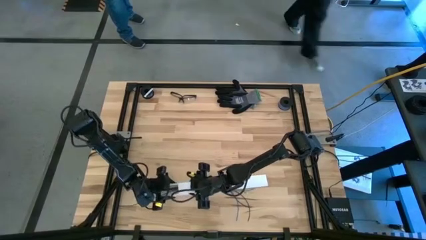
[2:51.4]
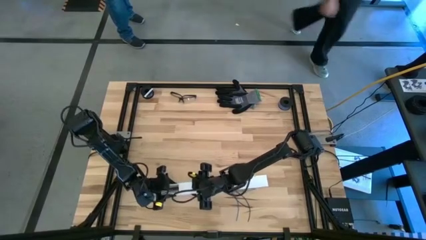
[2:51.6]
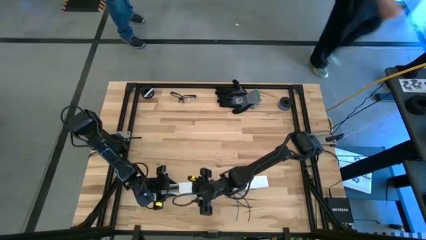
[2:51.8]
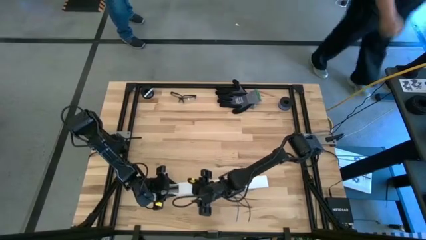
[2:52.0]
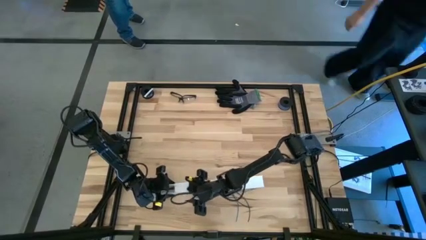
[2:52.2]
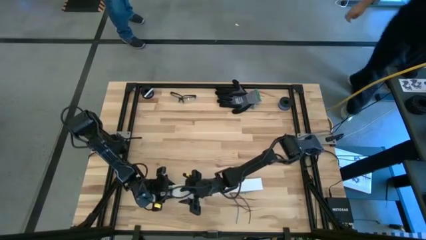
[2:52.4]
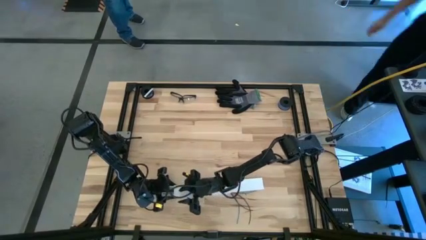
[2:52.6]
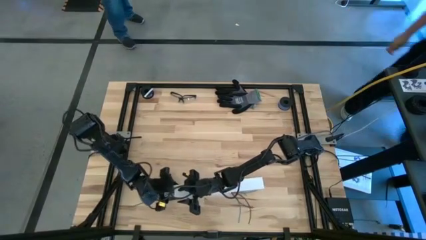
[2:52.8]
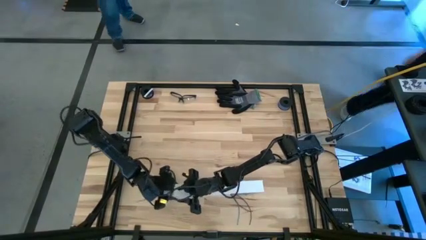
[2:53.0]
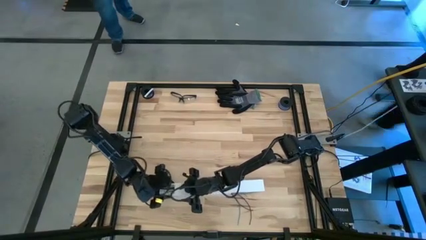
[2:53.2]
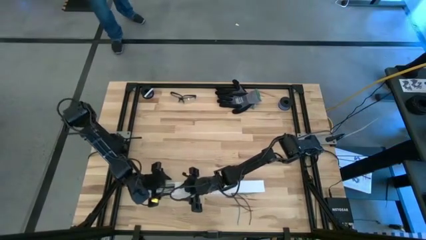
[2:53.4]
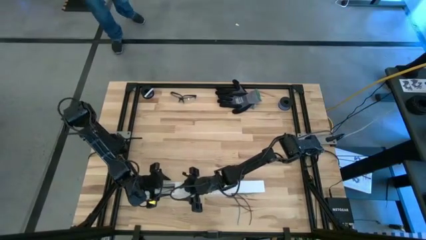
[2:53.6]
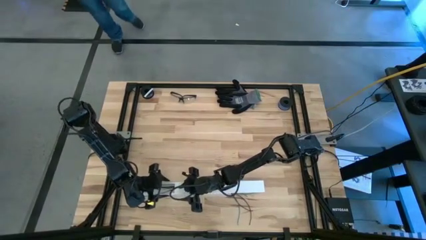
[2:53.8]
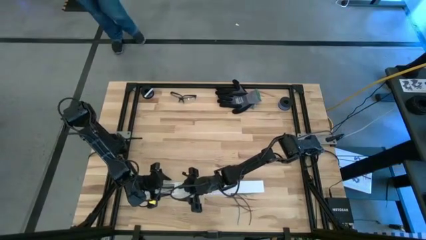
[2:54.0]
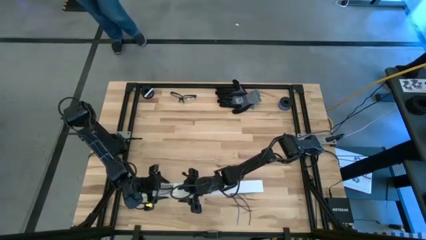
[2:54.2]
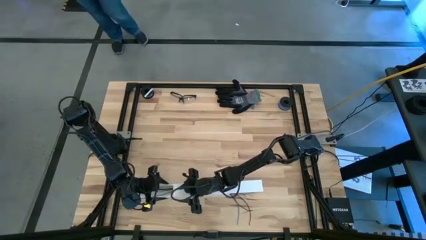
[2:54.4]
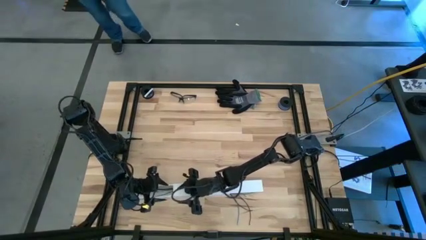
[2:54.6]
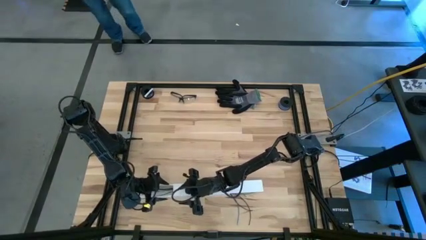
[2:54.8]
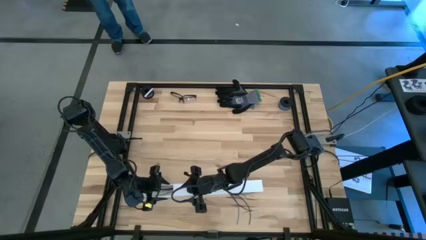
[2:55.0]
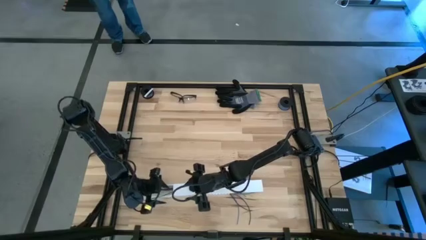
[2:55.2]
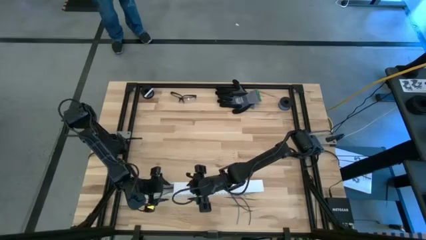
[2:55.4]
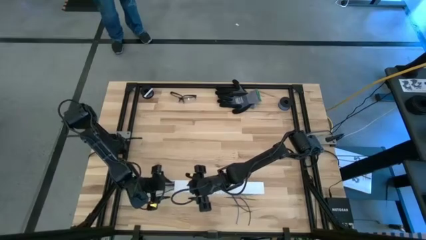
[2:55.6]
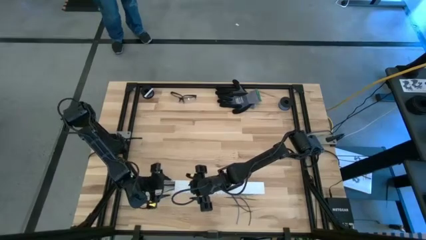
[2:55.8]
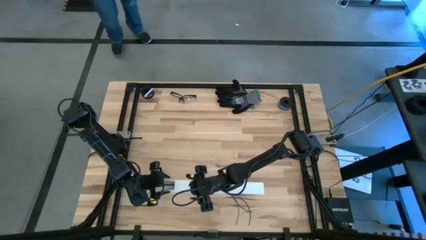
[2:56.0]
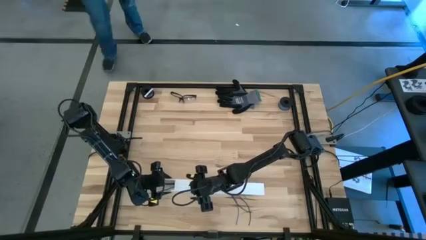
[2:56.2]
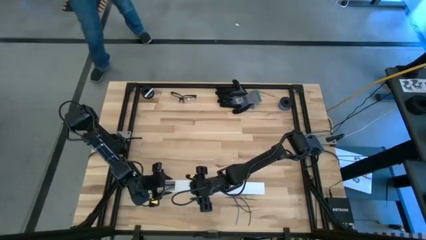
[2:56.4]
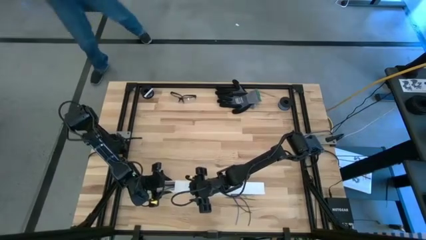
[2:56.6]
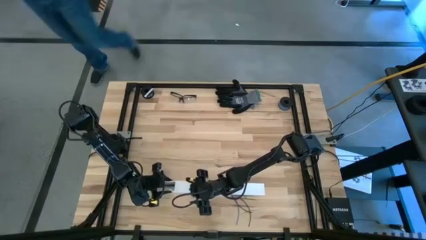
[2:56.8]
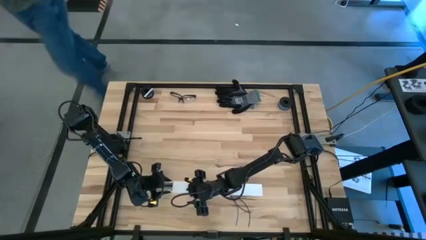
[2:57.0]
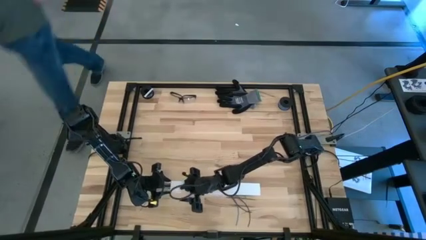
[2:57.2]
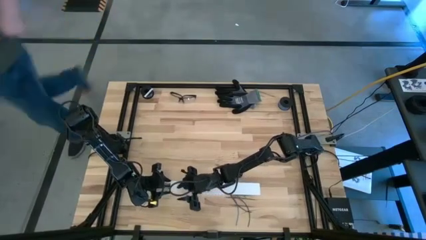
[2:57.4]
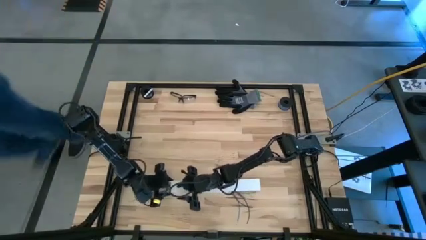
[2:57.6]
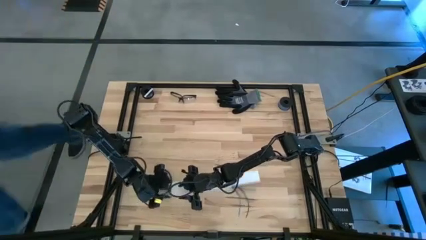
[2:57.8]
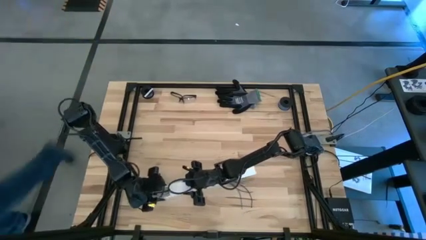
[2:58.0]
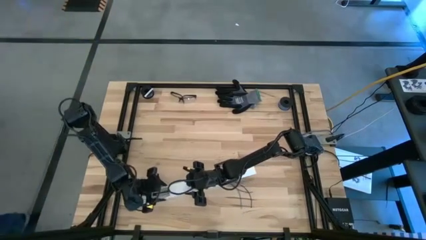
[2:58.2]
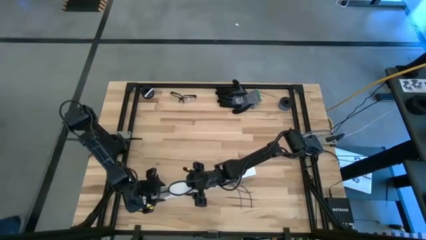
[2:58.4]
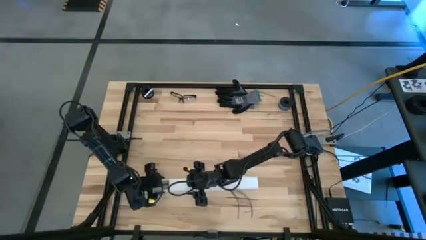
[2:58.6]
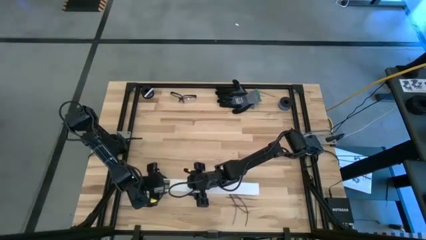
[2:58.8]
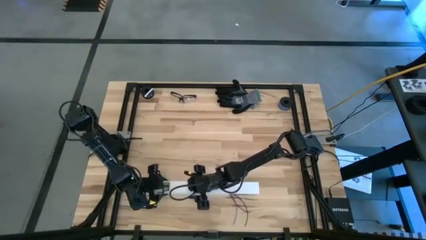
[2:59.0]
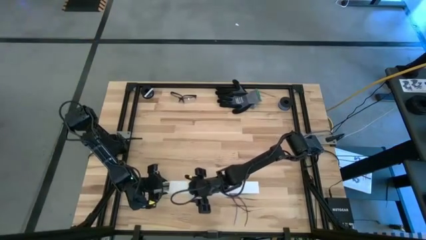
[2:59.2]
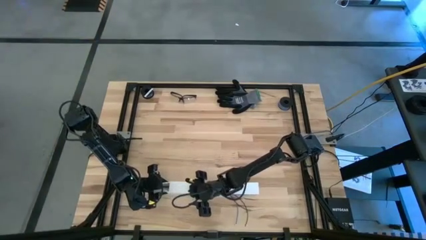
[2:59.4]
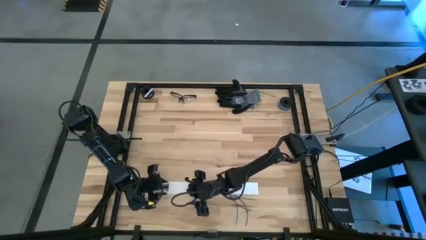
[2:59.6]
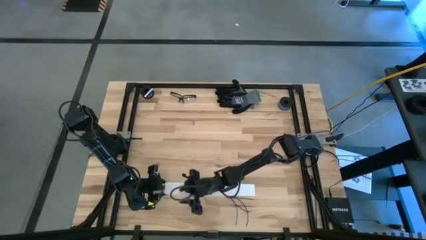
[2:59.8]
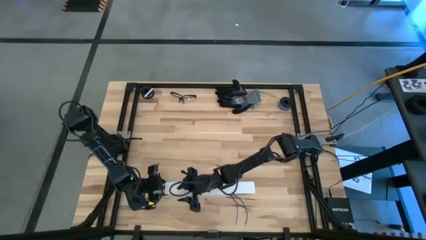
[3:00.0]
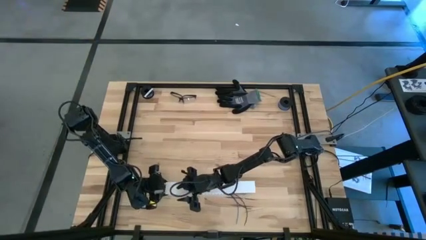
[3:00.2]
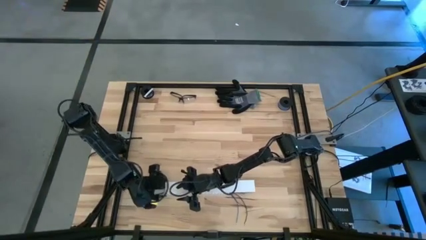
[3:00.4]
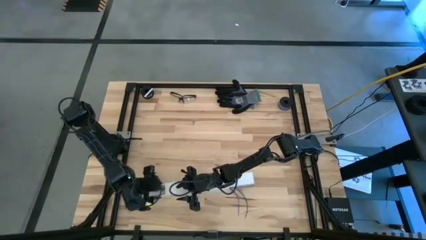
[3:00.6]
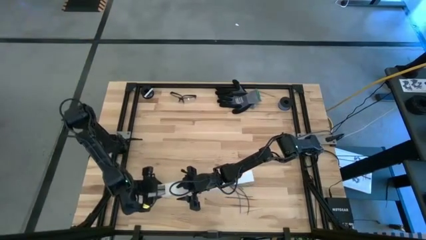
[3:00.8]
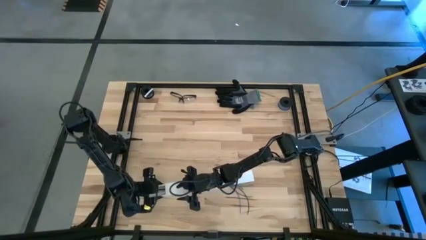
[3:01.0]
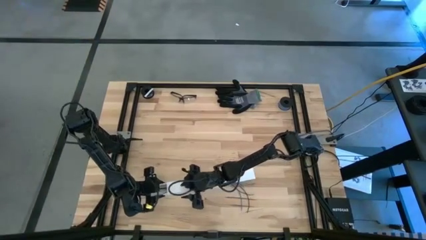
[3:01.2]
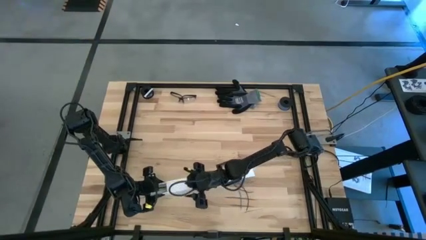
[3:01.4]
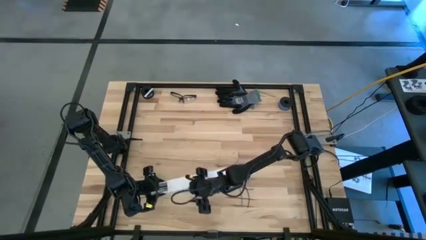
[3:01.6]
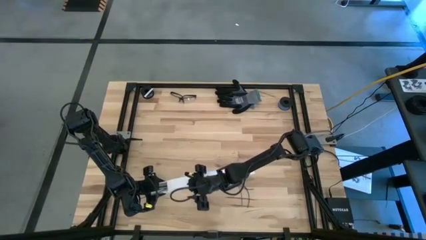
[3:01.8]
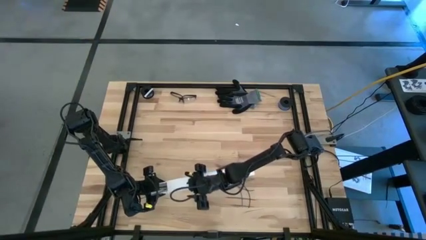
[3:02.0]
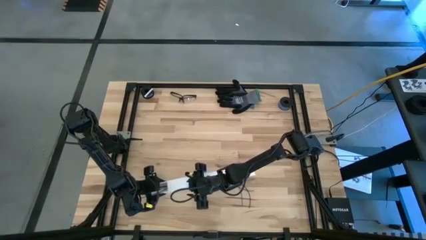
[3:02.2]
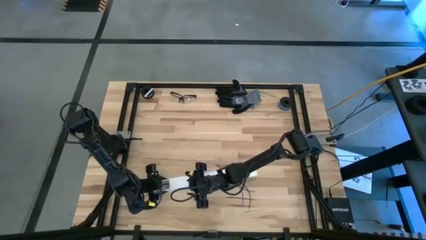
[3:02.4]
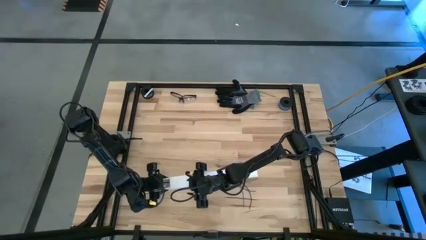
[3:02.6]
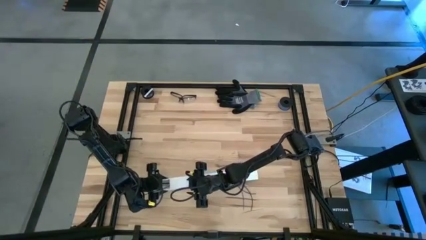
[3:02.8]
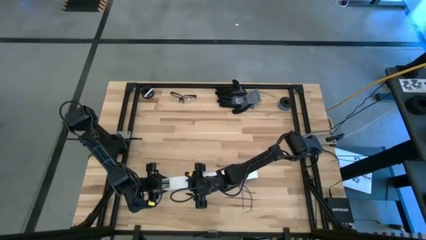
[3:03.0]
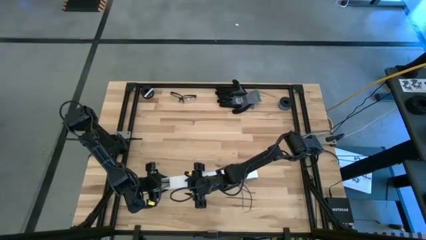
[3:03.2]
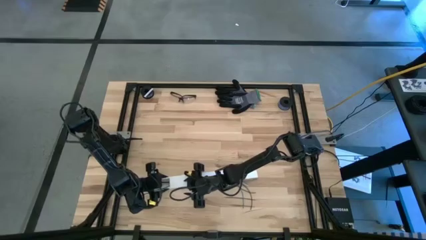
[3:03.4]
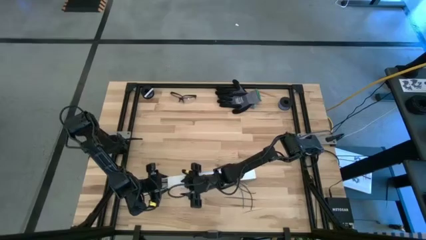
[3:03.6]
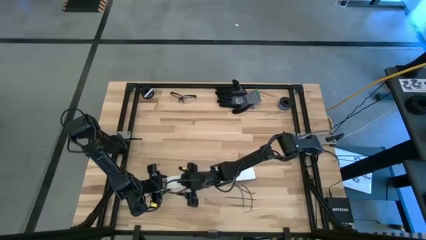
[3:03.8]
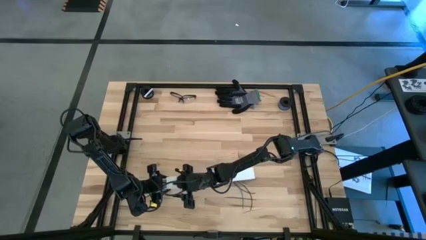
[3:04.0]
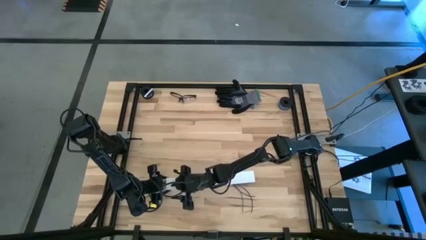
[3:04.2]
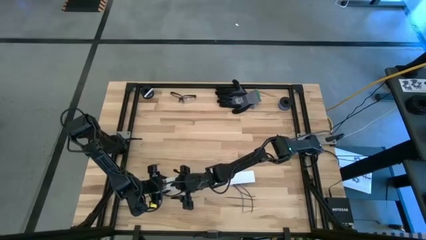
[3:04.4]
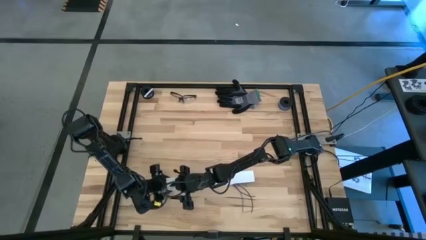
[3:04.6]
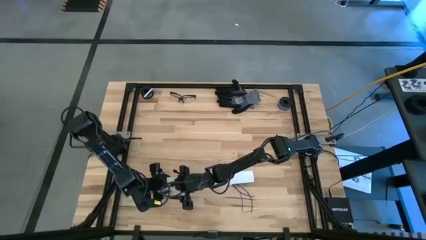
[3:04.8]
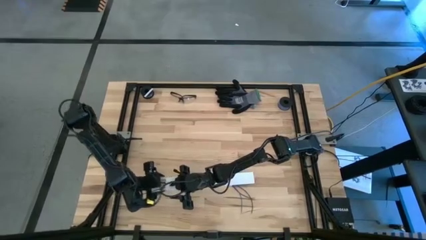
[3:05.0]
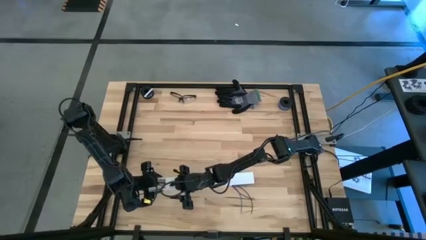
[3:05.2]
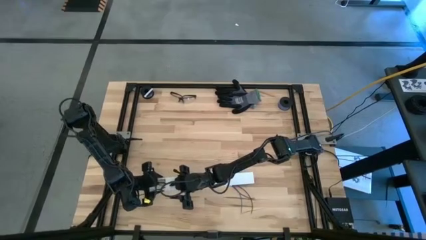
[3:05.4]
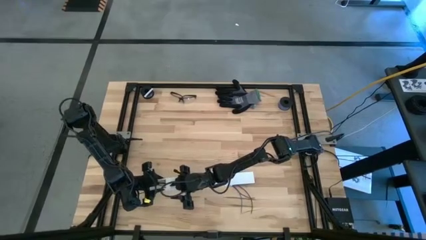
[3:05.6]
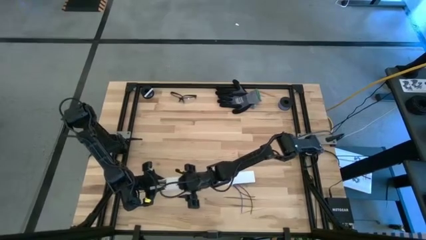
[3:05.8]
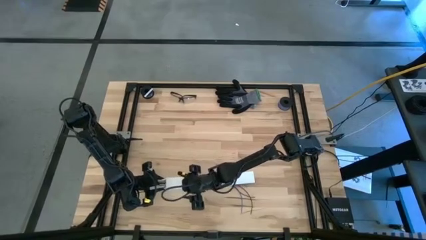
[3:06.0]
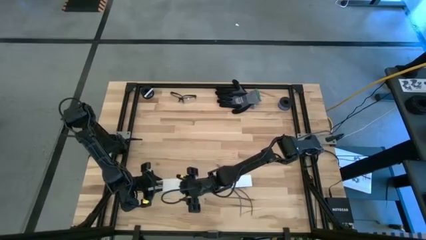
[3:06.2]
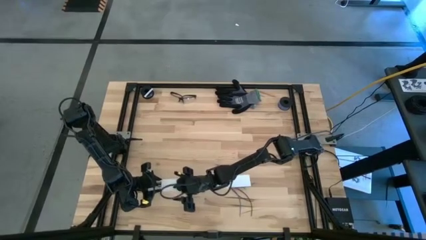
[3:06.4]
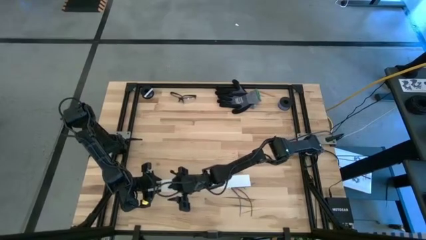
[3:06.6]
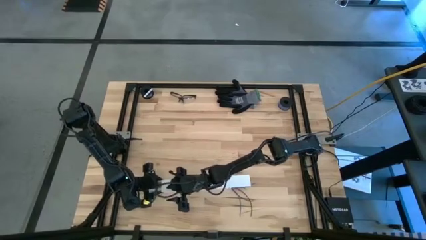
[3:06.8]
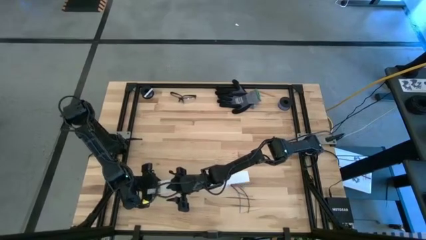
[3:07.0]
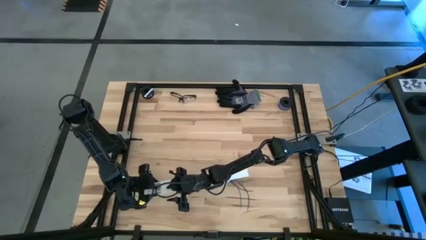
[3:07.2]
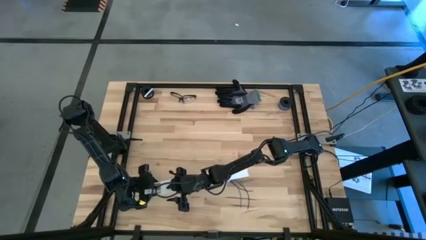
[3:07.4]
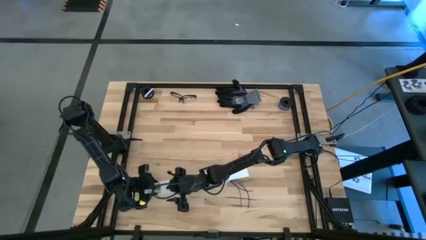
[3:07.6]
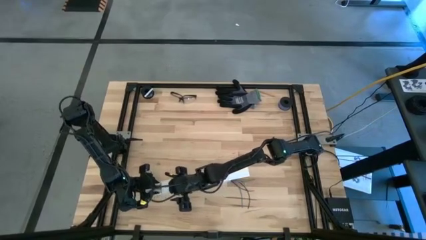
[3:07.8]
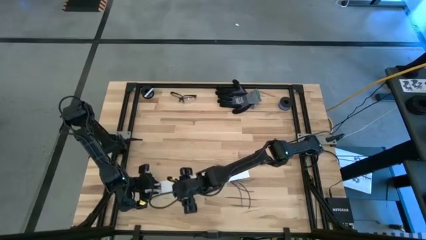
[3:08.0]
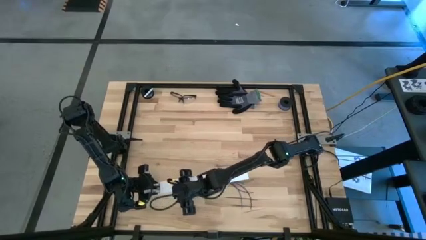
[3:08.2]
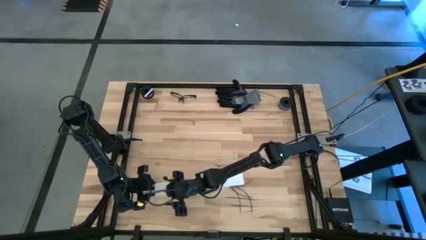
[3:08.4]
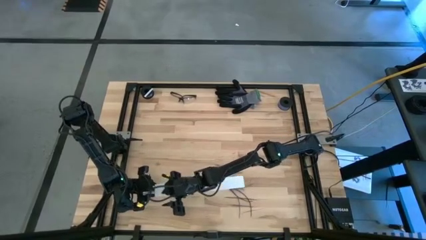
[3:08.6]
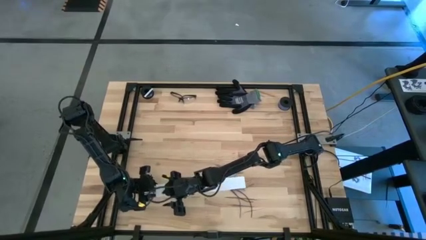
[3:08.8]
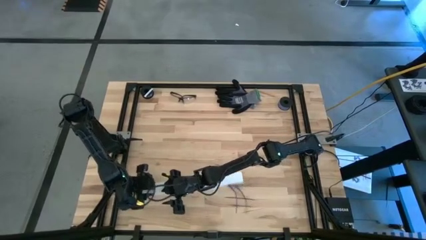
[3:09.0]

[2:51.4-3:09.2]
Task: Ziptie cables
Close the cable duct
